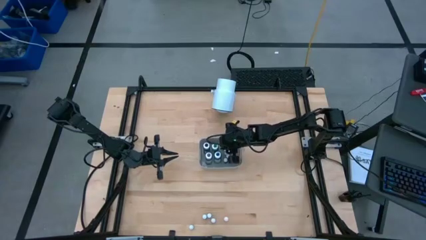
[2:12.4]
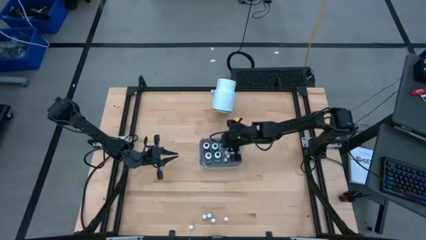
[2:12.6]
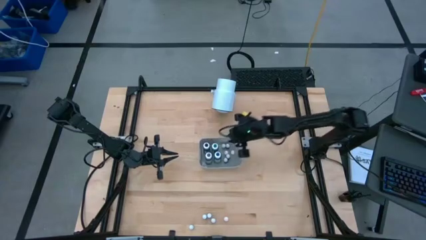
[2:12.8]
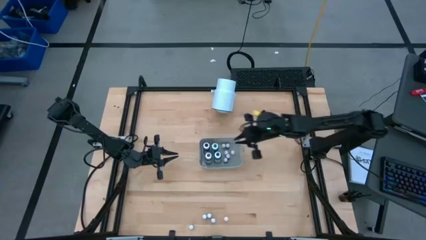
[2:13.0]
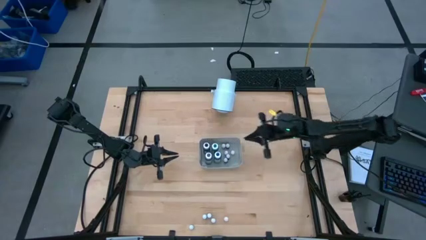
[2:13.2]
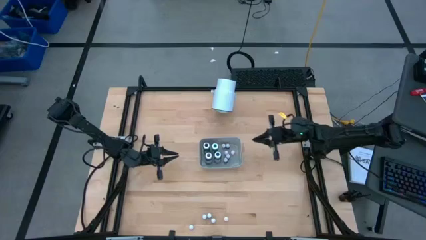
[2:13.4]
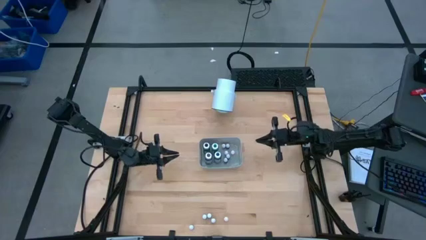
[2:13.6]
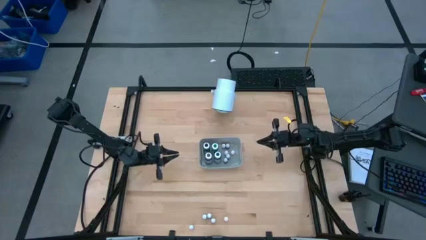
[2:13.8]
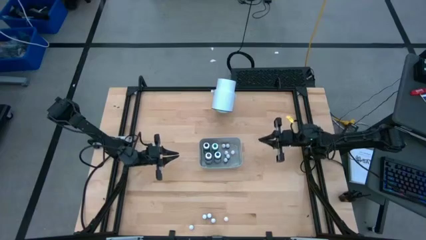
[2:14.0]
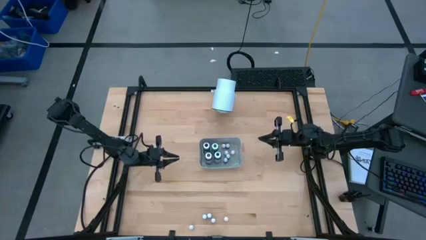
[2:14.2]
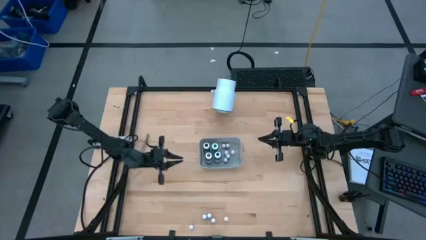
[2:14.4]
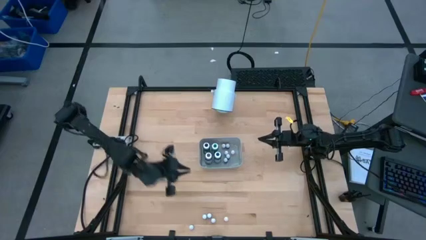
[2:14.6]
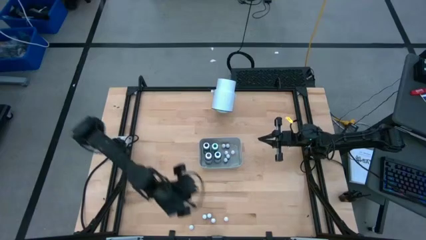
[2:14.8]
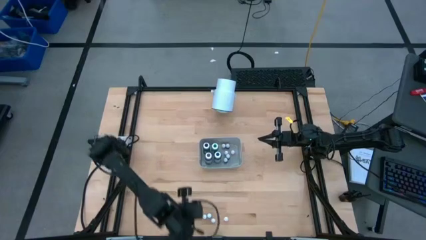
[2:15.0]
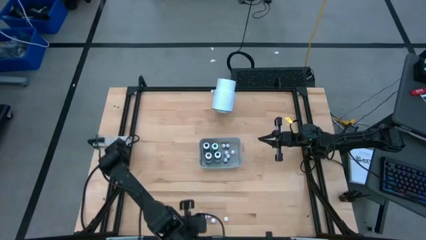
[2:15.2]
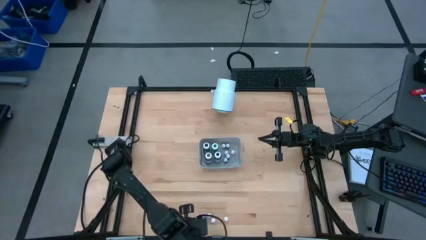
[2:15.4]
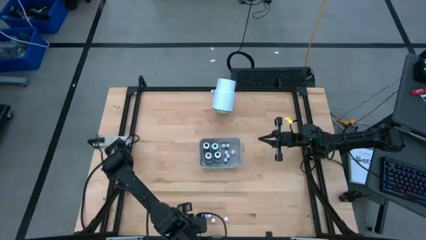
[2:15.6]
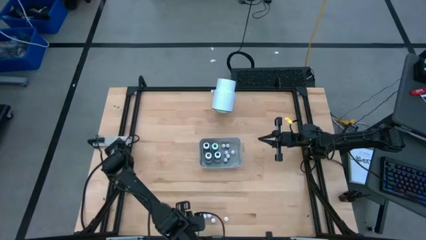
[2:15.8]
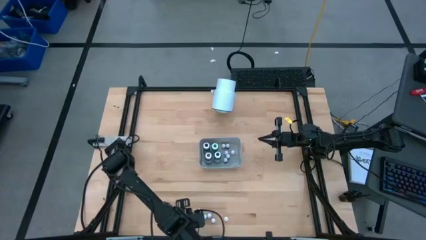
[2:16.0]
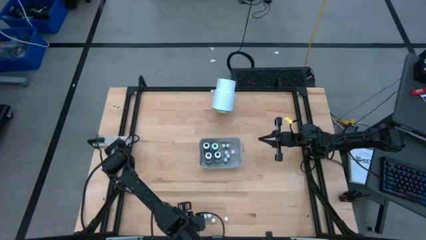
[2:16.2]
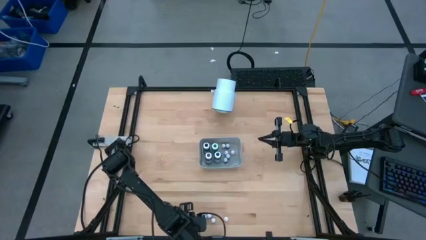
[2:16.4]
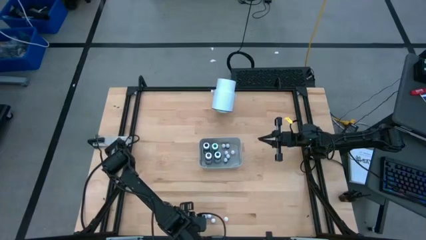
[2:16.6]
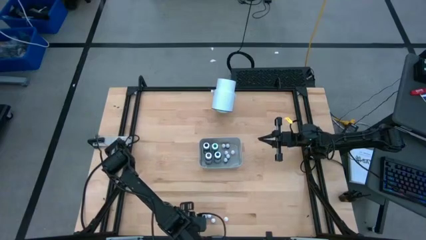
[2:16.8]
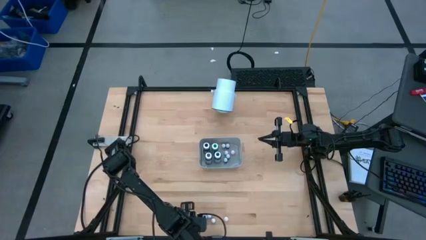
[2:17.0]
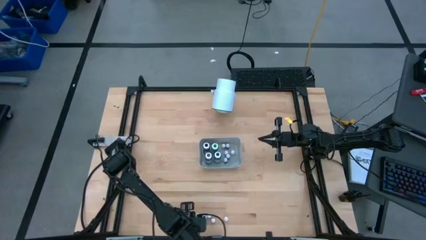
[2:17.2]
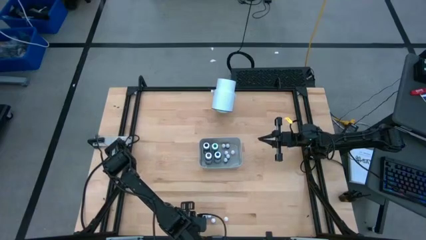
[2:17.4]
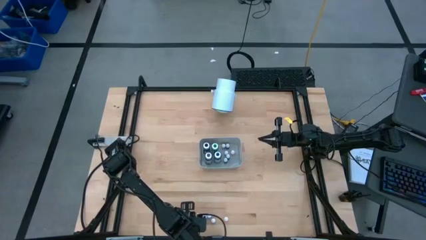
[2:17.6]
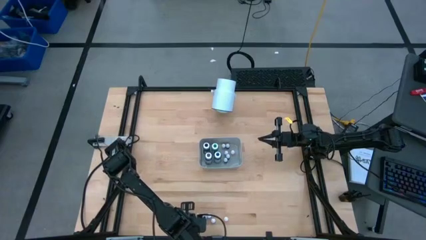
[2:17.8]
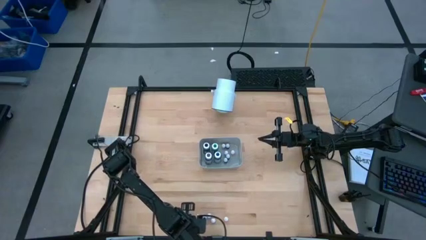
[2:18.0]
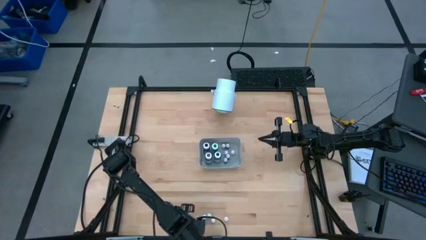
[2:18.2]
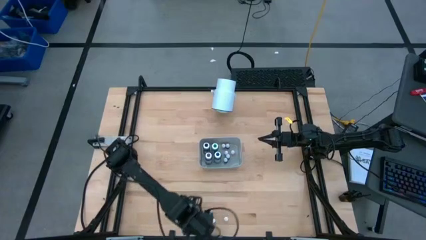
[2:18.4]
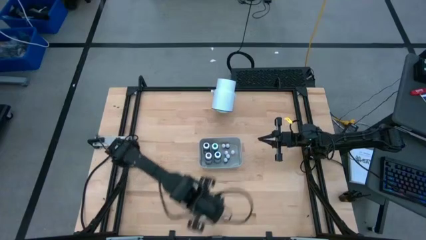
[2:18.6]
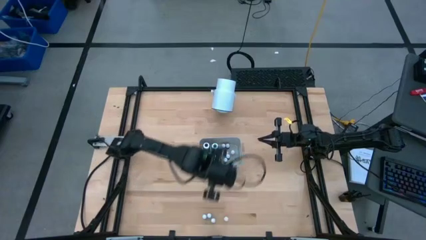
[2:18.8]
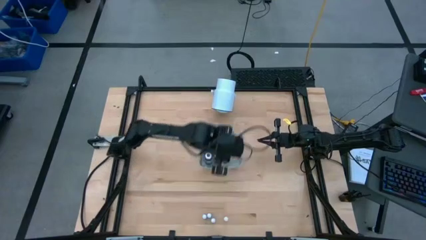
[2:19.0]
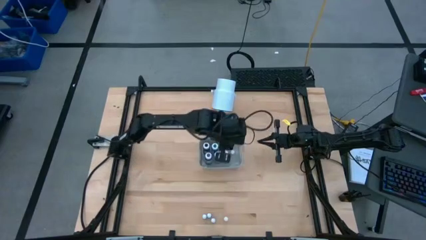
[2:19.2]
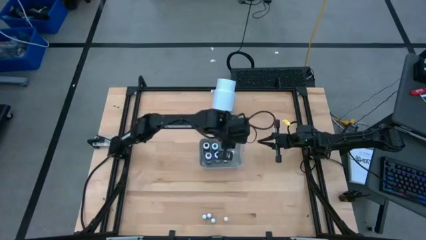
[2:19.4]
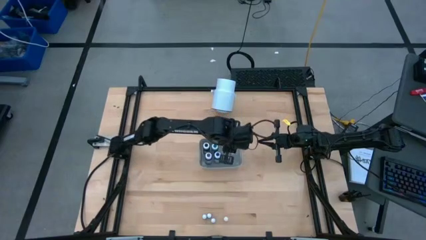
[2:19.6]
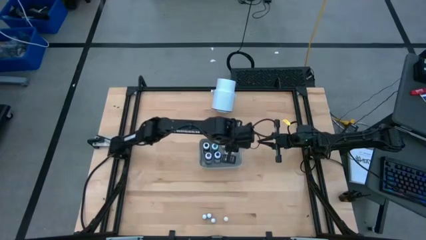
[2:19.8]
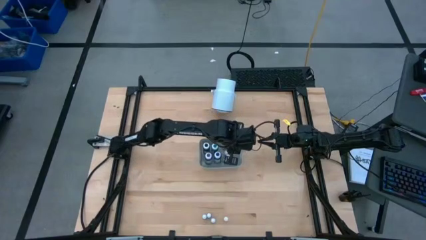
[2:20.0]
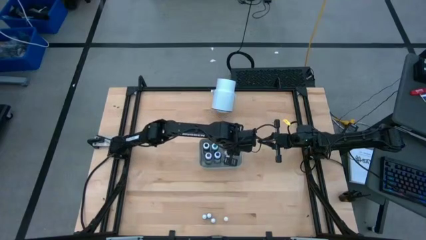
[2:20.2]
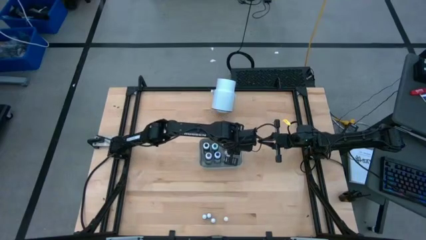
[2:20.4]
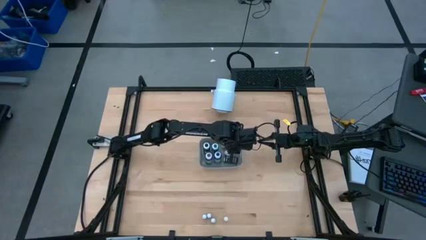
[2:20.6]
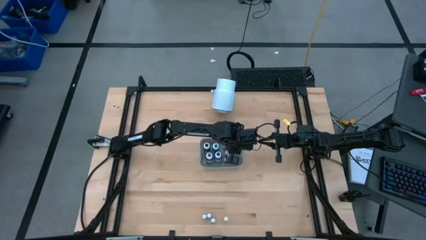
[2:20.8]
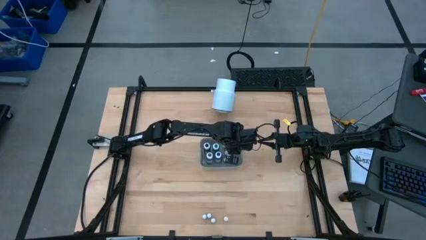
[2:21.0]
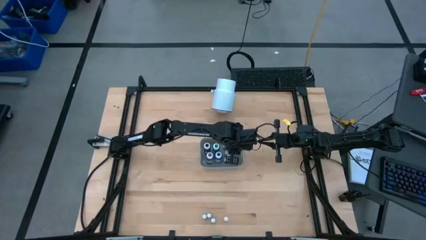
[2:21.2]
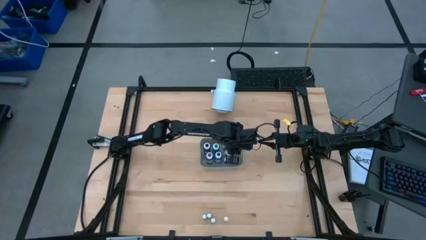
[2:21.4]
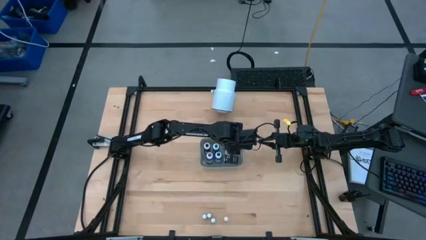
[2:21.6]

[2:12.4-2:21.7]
Task: Pick & Place food coloring
Put the small violet food coloring bottle into the gray bin

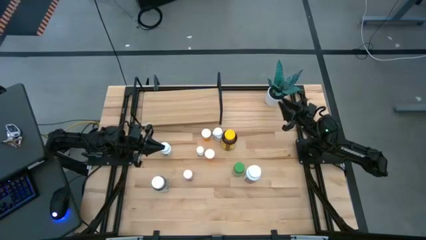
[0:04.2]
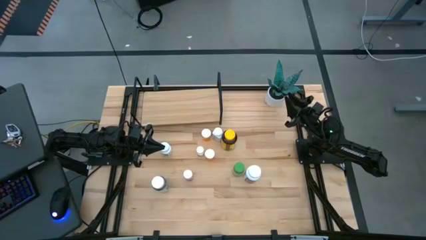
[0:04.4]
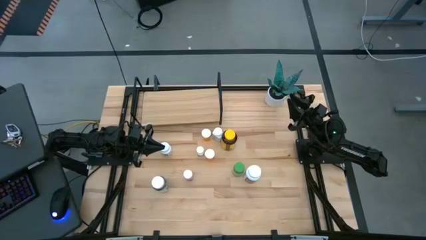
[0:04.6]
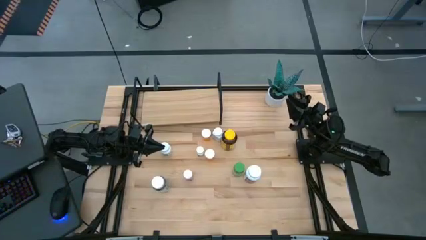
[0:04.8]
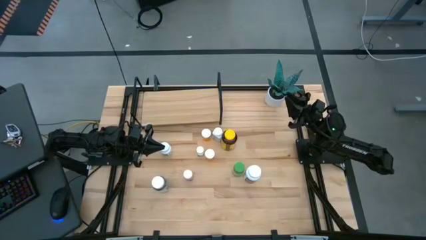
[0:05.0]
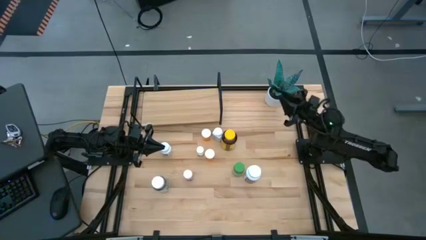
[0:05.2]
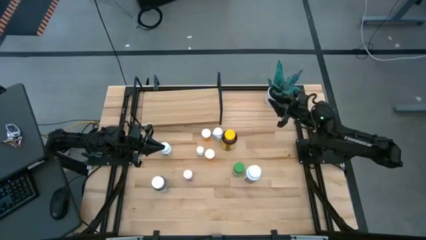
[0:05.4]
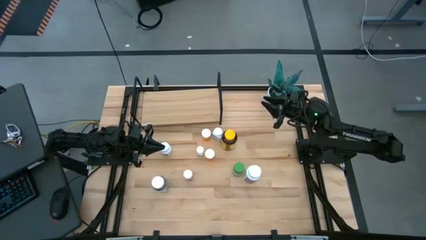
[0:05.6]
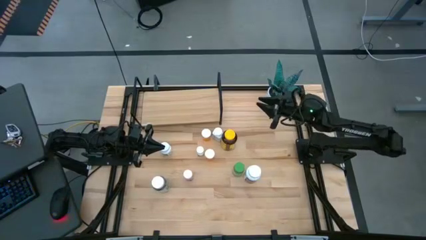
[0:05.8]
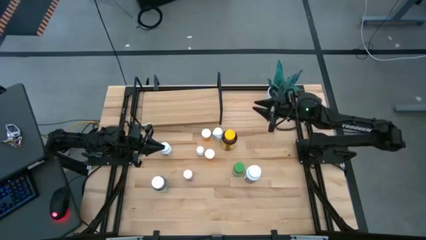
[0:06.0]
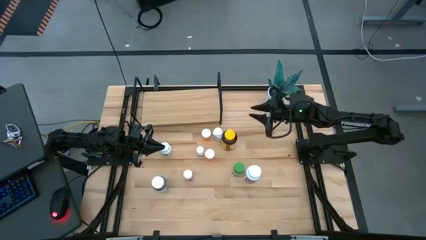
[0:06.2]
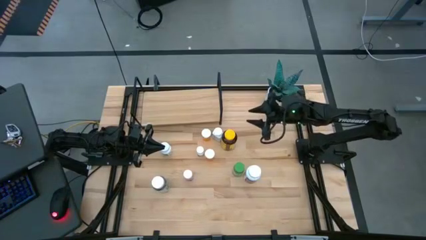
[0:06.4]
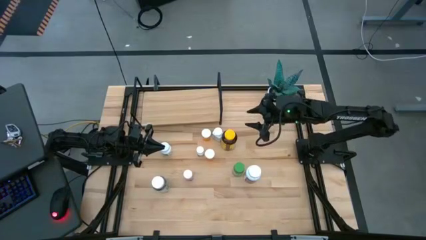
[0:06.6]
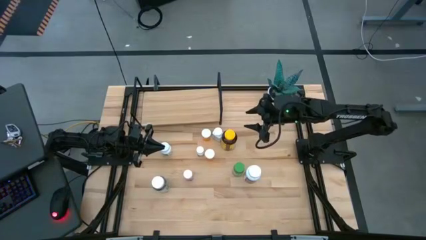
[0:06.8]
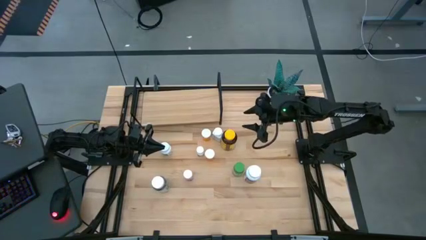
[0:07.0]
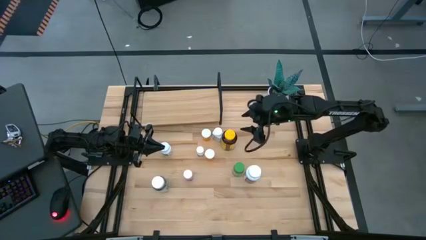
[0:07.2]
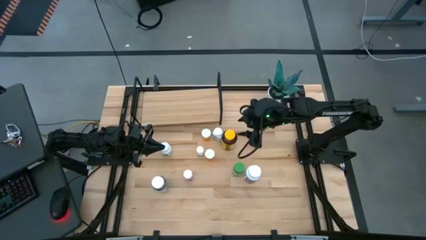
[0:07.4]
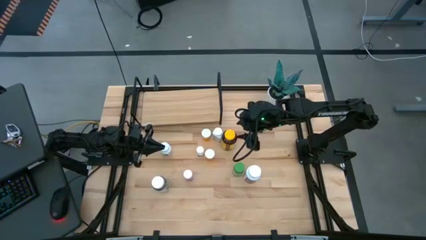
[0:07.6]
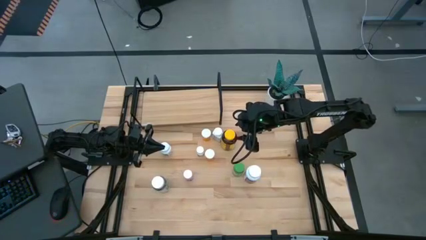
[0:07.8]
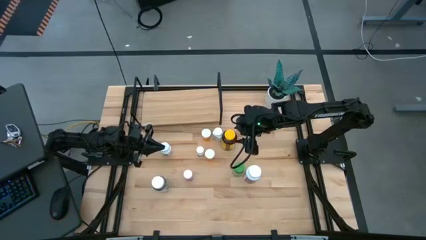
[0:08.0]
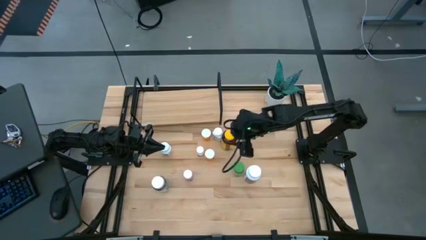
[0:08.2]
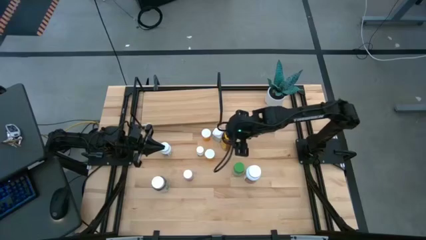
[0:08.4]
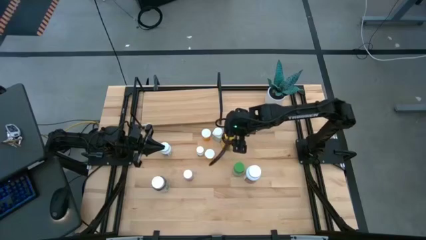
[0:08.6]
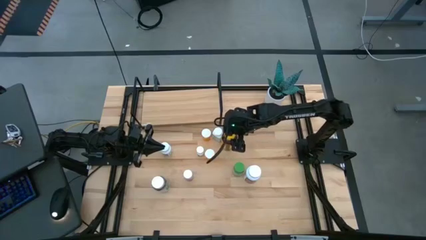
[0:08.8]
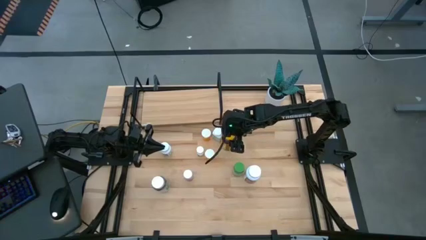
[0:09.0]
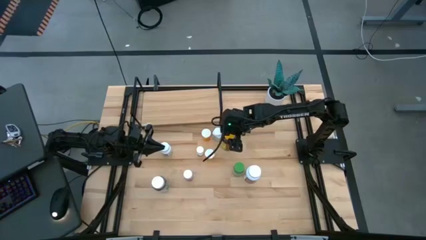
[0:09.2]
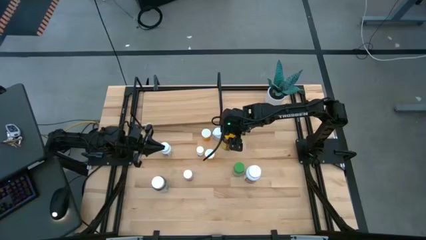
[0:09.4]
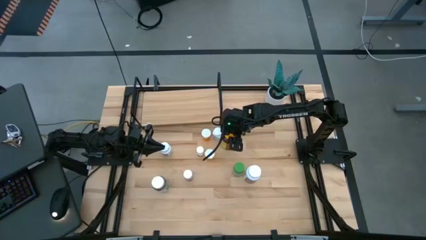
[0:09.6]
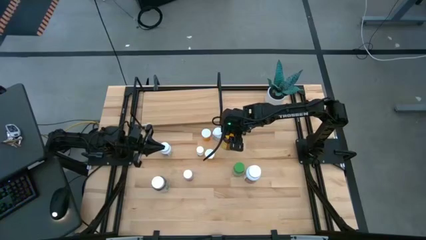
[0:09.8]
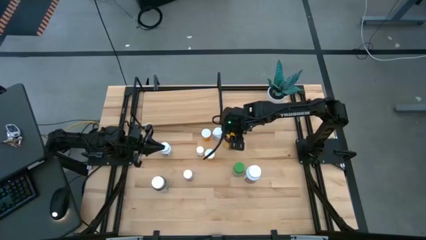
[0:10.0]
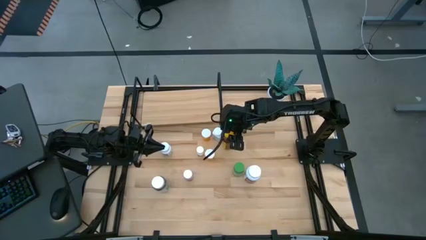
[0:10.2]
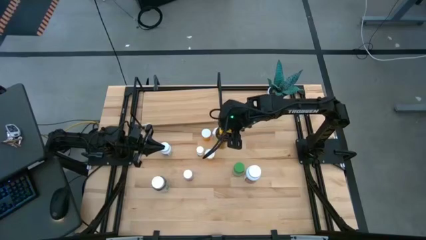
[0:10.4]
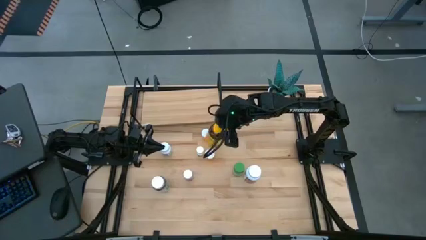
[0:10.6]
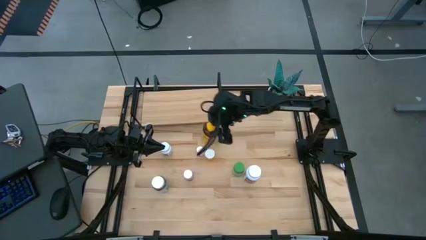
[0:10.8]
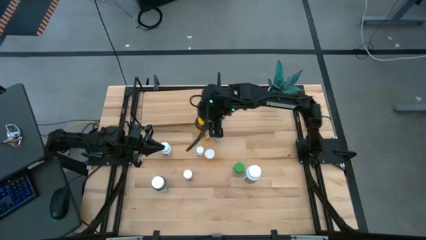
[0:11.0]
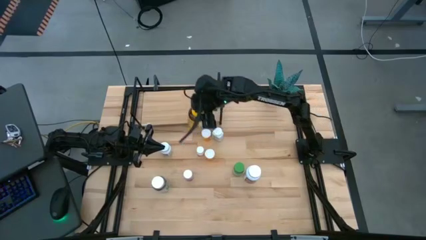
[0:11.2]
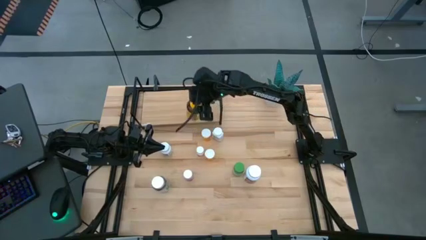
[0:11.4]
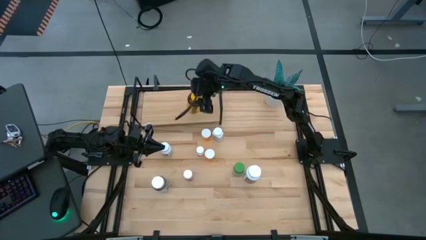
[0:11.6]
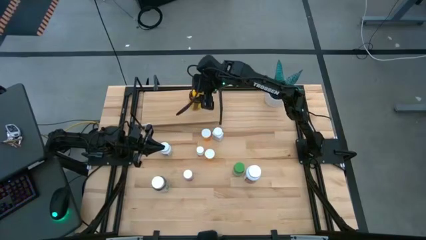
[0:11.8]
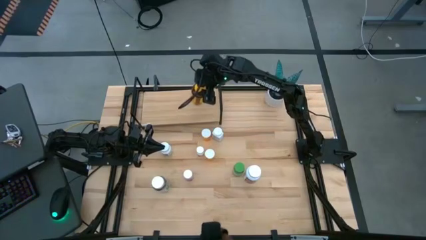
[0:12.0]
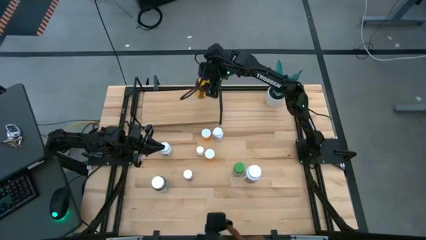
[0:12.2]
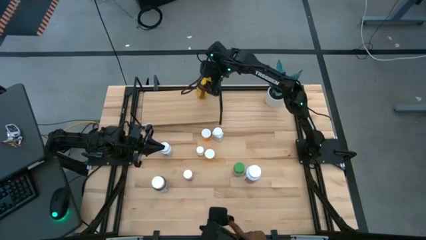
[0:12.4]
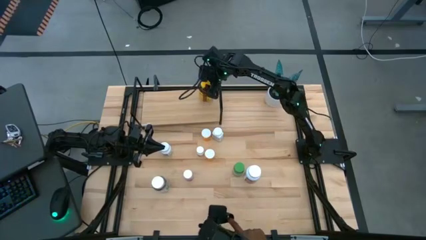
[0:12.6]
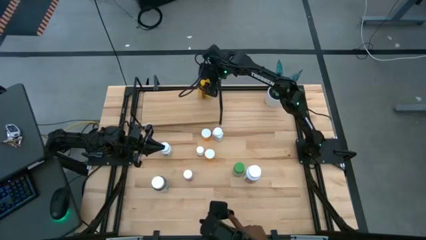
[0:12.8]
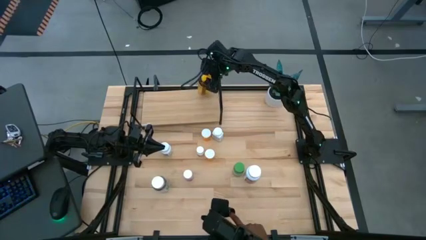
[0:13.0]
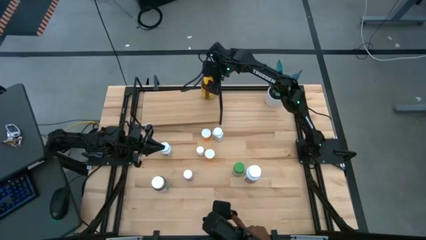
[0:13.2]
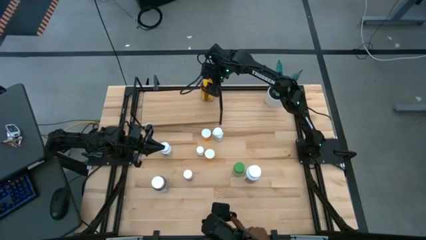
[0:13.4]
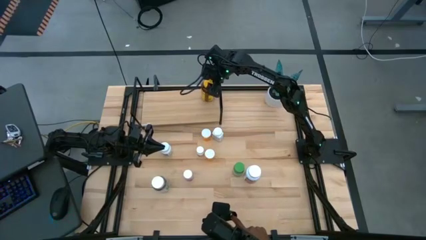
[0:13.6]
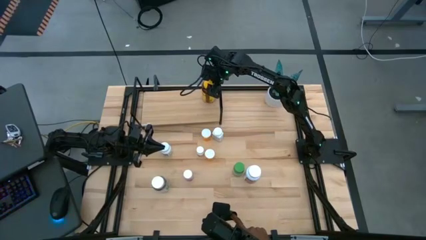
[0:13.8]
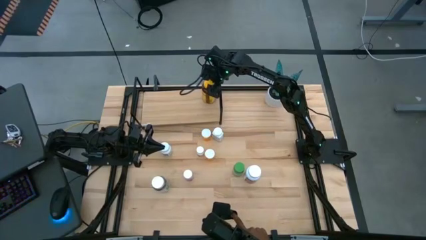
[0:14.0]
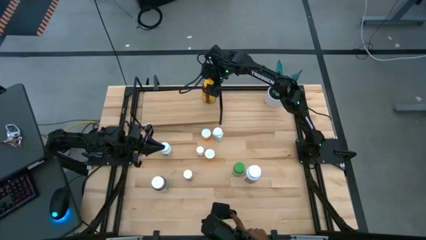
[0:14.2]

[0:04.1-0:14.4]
Task: Pick and place medicine bottles onto shelf by color
Put the yellow pill bottle on the shelf
